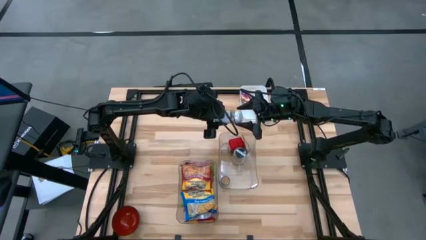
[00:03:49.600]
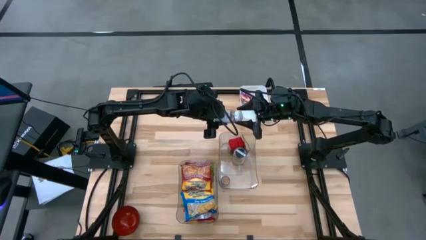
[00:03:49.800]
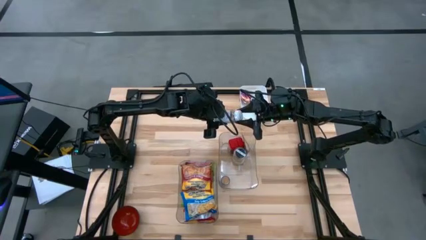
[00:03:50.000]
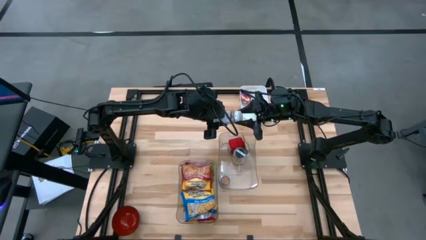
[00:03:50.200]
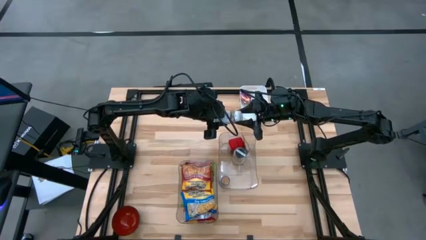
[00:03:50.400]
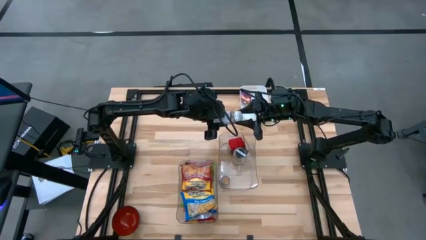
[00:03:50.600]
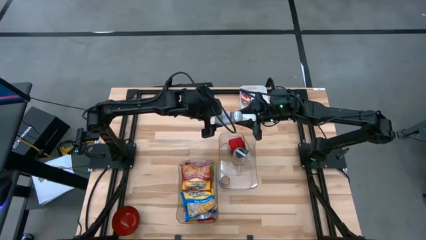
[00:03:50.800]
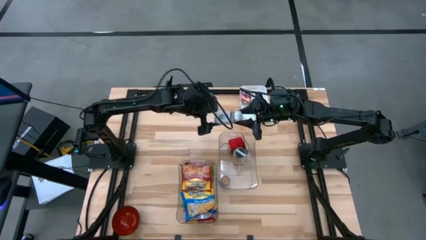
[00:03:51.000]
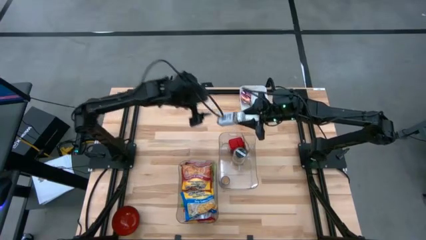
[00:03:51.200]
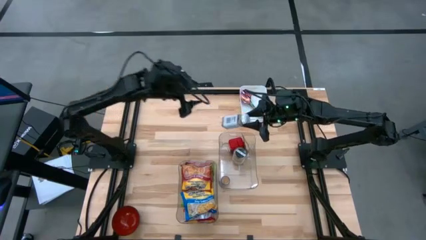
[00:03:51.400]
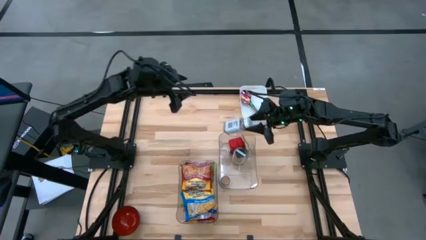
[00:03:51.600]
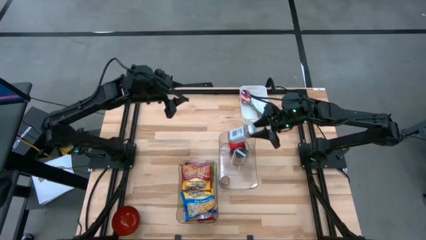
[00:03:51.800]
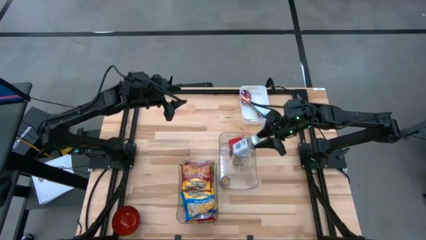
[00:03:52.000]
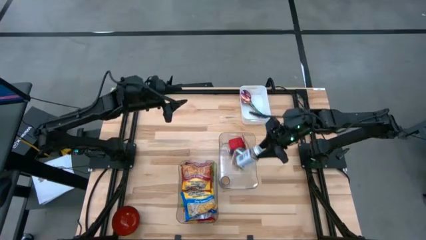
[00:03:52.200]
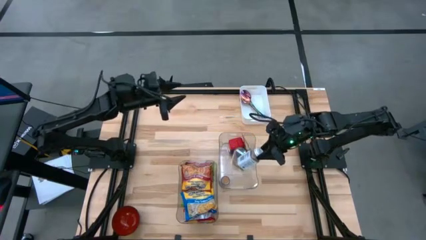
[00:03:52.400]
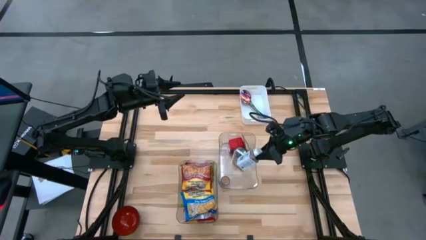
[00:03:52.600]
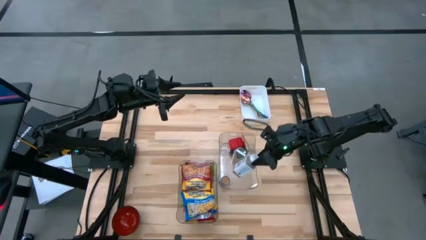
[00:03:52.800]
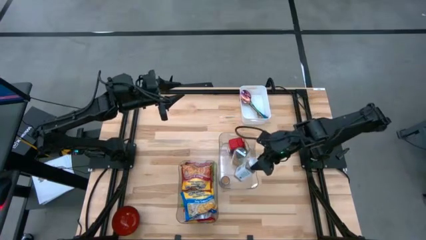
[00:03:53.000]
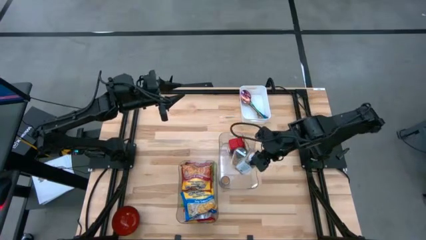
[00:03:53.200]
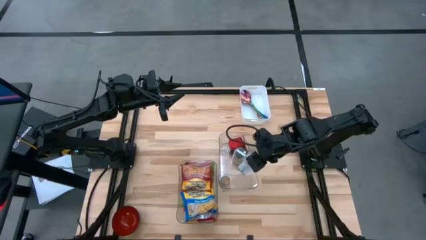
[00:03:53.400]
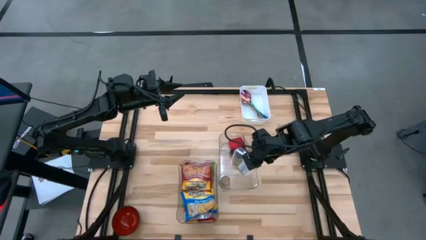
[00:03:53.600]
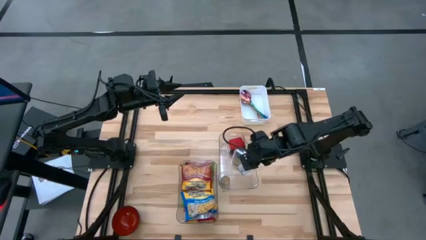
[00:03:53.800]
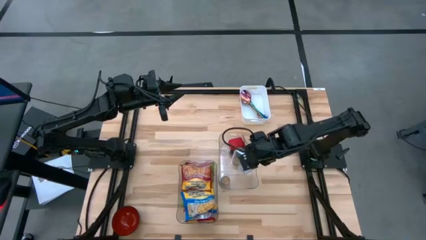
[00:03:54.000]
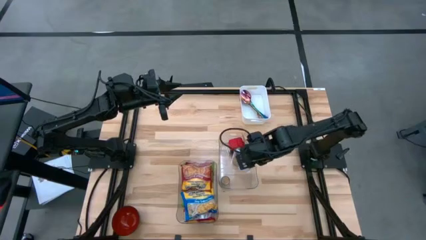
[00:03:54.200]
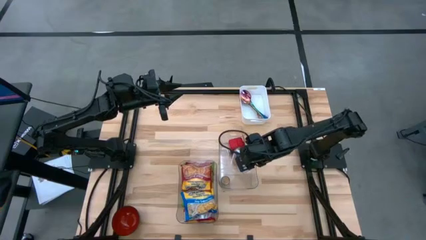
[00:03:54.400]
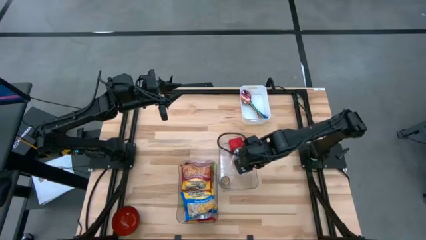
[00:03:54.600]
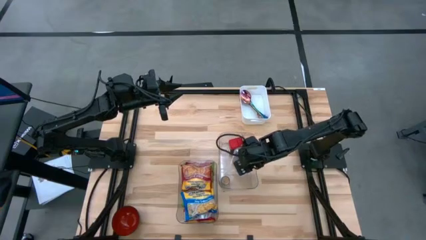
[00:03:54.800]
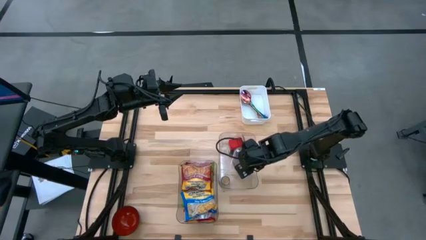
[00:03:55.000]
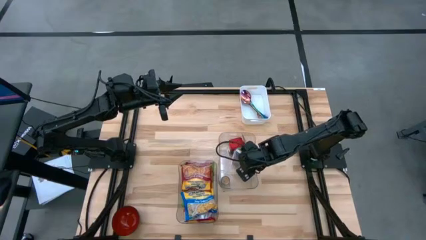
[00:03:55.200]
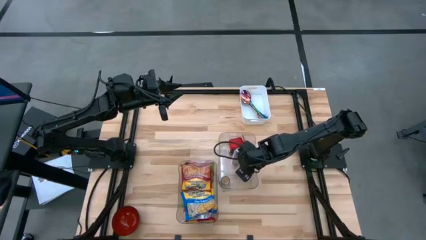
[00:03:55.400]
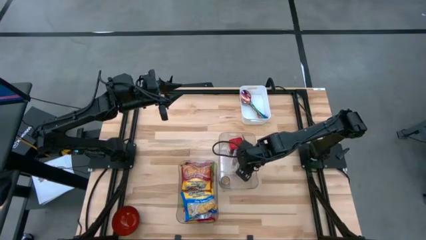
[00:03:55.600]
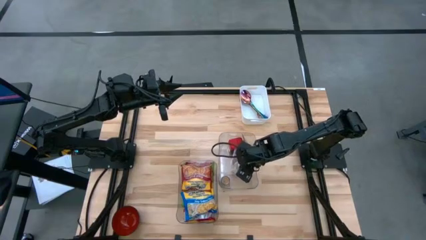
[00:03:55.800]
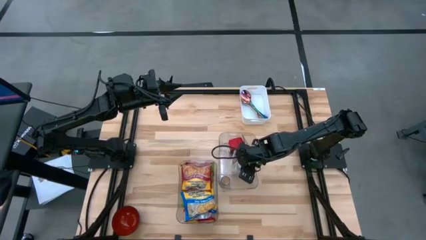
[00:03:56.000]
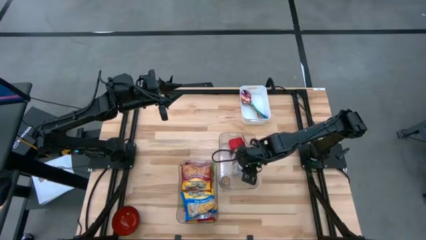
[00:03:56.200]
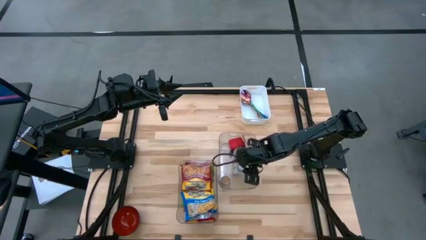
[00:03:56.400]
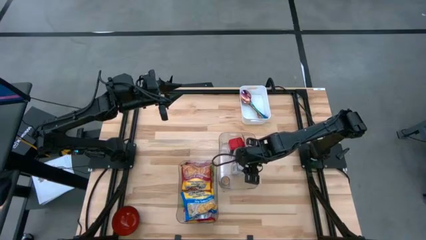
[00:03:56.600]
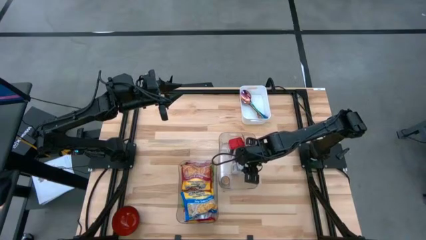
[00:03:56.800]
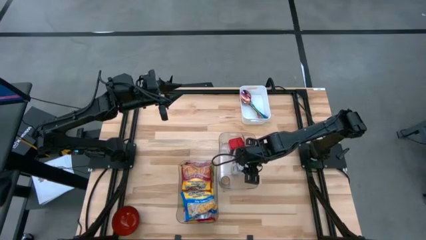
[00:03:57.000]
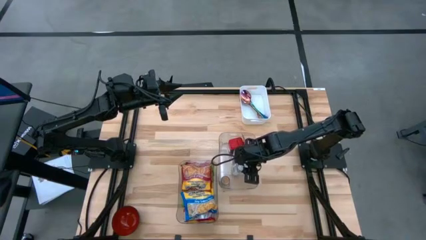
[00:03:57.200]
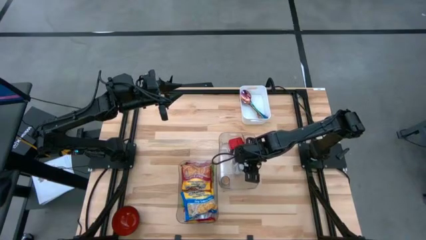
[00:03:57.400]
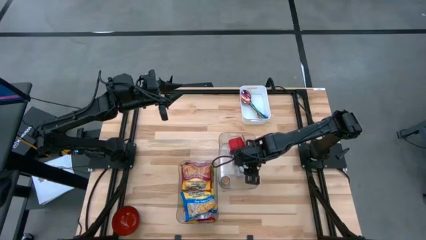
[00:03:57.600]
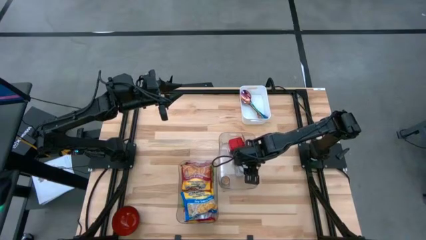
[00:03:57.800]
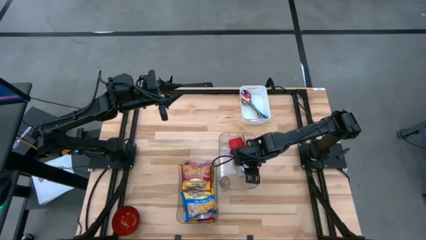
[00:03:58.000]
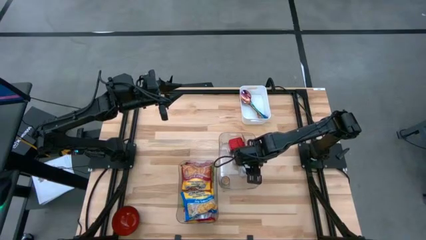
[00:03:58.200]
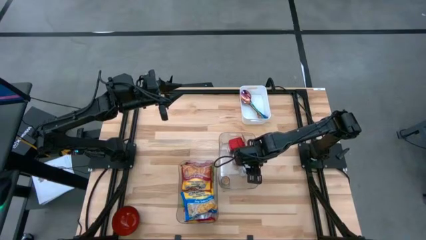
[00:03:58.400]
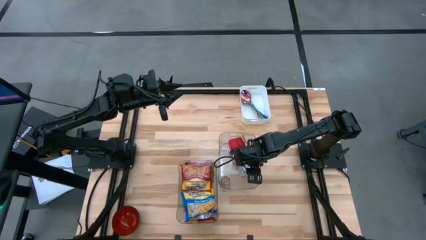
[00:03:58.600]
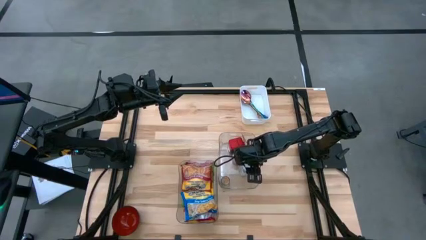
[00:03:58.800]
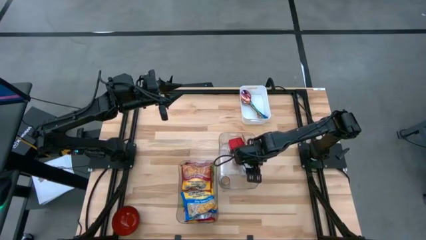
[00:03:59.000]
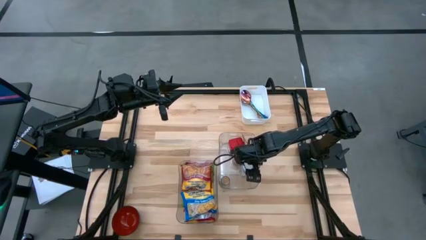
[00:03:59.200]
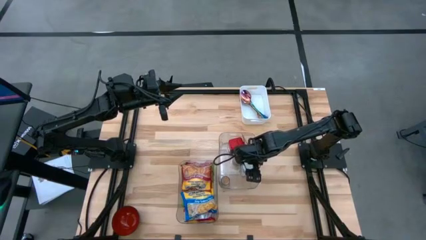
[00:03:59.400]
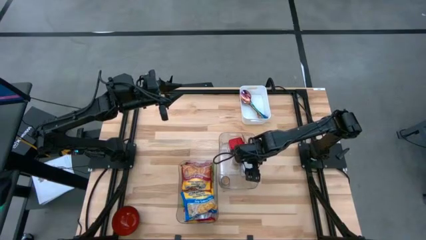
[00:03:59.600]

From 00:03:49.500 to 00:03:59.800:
Task: Pick & Place Food Item
Put the white seasoning bottle into the right transparent bin

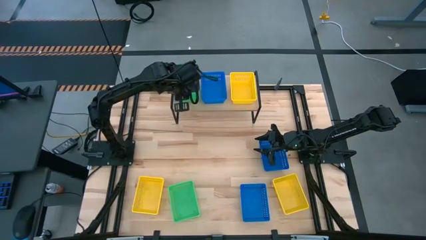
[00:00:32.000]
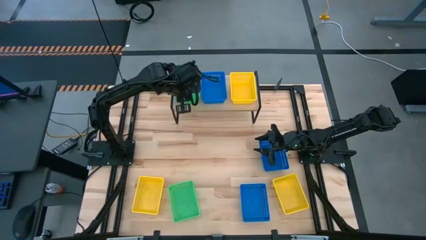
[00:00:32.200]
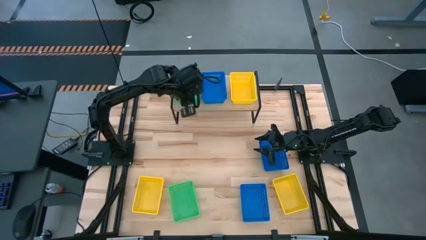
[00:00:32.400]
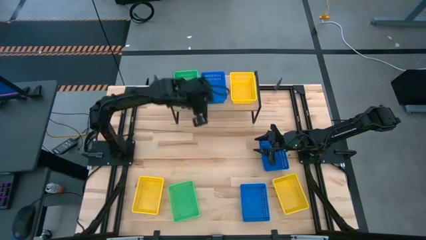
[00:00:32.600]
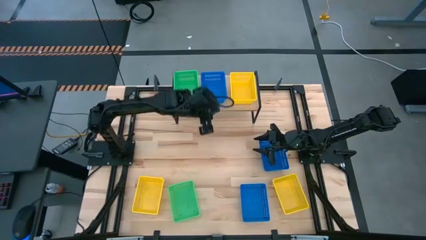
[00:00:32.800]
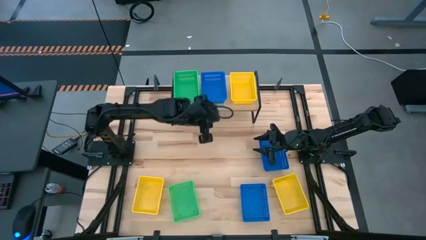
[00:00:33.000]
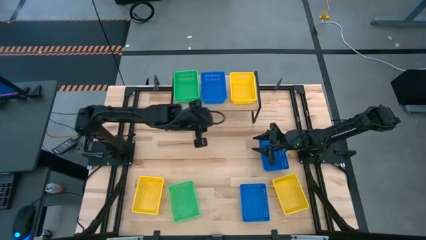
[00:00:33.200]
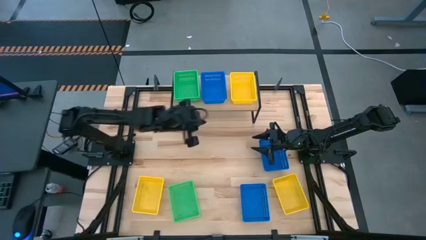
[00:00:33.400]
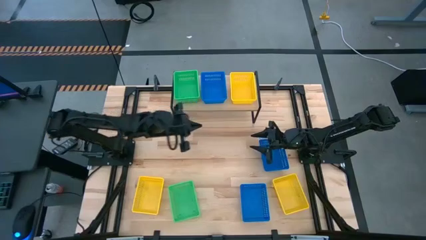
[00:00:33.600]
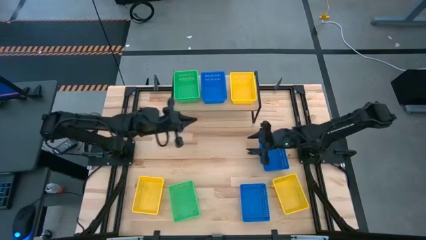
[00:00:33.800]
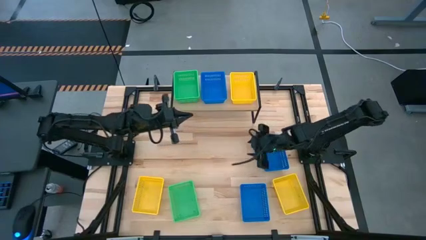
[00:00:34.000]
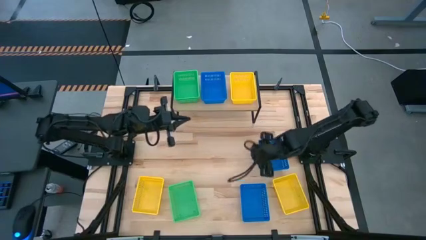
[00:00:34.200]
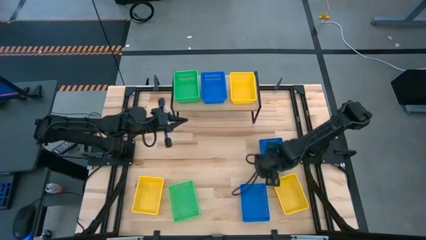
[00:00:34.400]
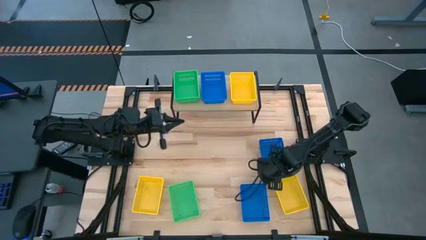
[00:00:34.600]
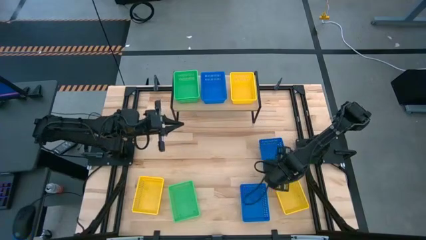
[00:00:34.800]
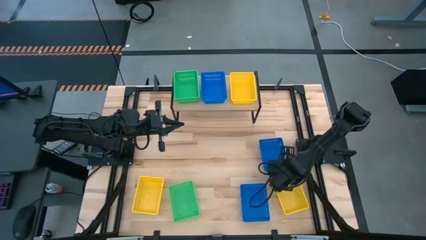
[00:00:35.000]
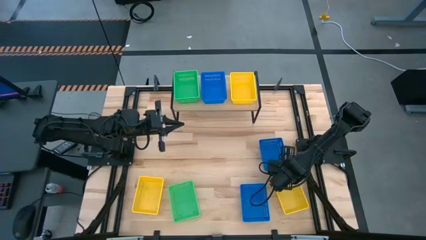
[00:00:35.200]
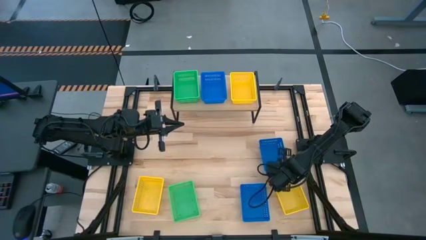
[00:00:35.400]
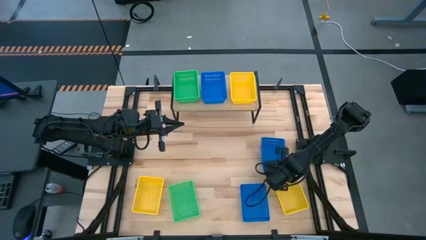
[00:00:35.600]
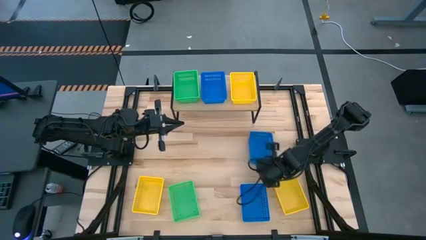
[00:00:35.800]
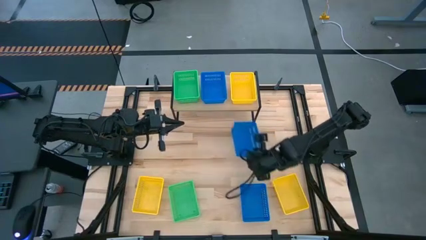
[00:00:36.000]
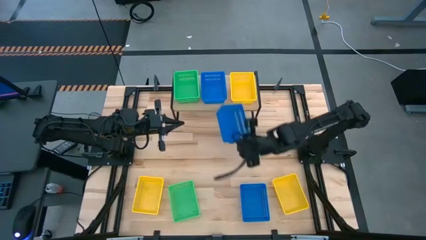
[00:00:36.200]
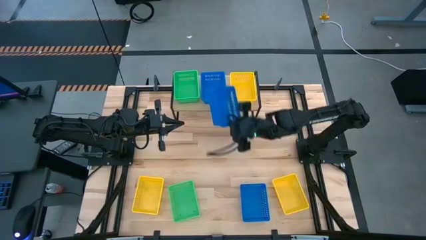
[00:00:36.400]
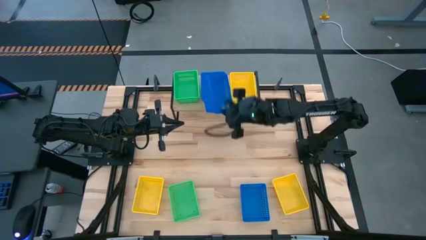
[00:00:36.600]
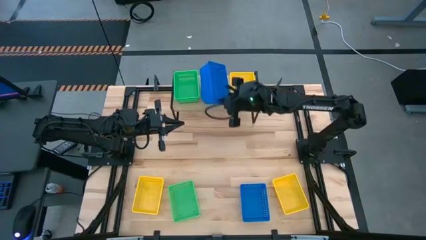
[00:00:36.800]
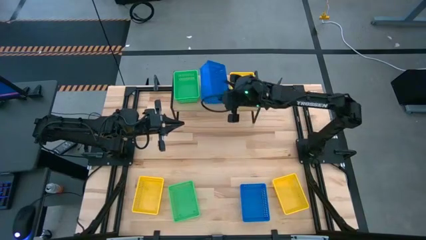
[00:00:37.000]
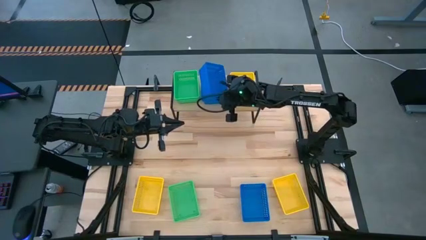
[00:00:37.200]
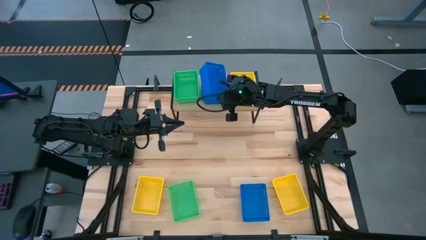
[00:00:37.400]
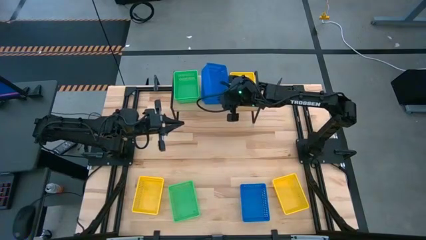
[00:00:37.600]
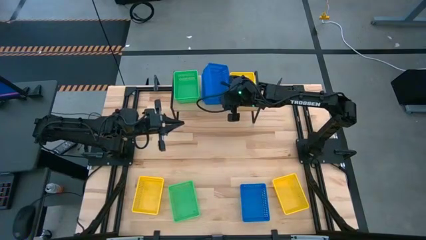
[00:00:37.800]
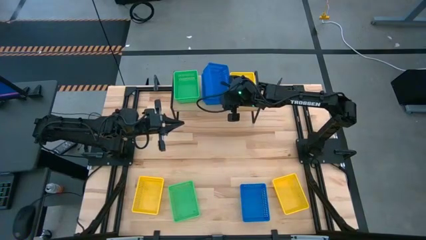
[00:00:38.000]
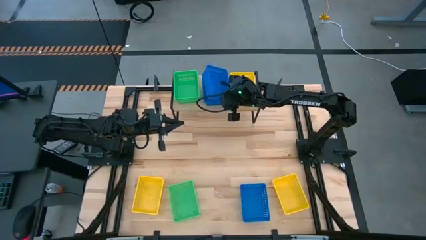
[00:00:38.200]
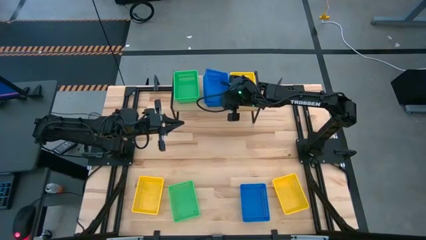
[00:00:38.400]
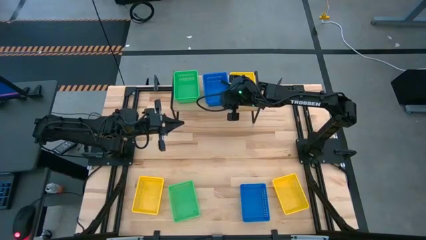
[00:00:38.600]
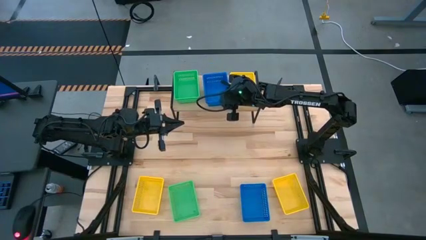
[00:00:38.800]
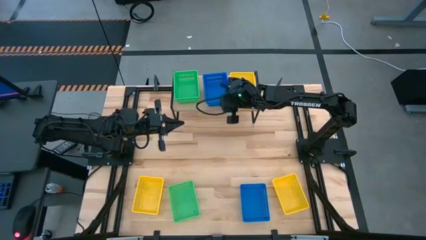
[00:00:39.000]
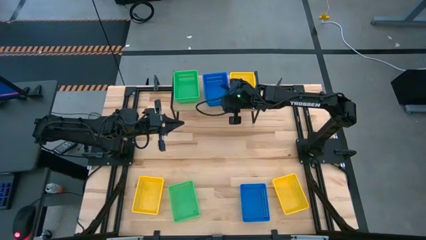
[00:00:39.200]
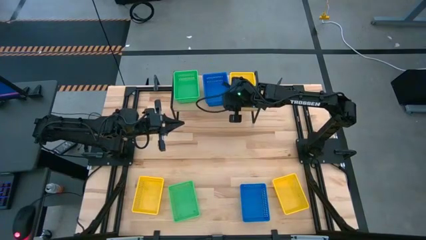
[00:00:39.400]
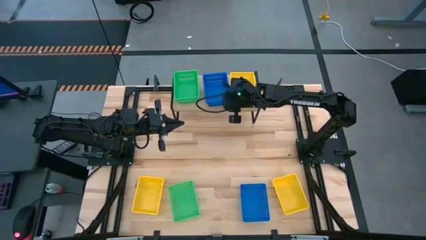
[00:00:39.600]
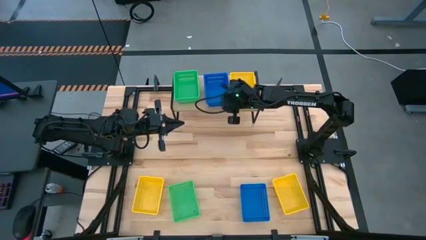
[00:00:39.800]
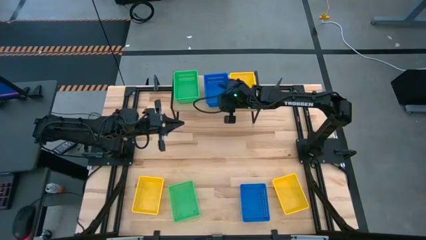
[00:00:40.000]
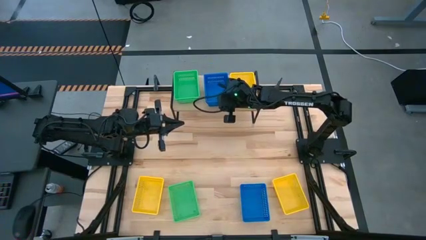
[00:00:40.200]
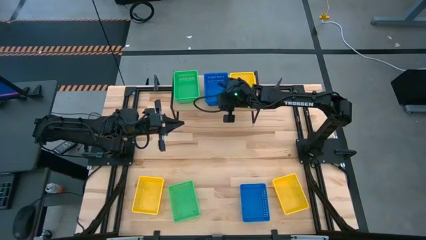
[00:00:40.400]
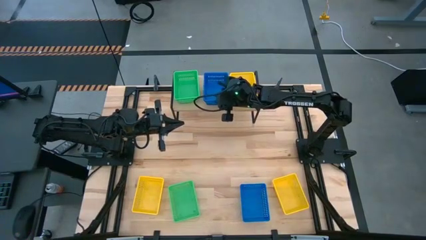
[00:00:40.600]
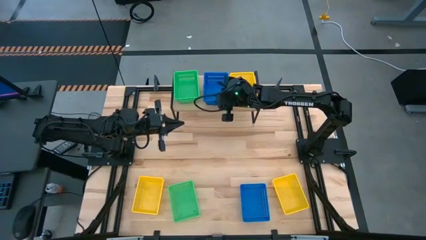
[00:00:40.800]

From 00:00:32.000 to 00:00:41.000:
Task: Stack baskets on shelf by color
Stack the top blue bin on top of the blue bin on the shelf
